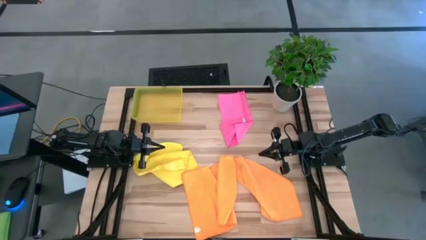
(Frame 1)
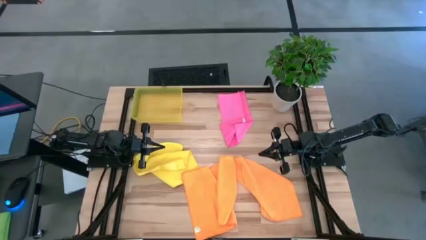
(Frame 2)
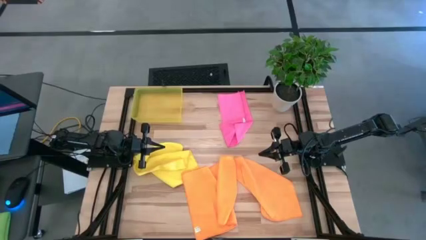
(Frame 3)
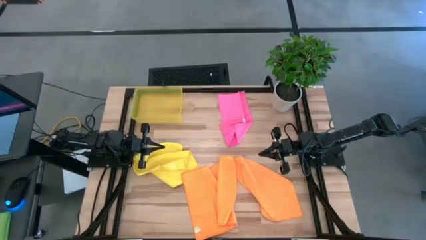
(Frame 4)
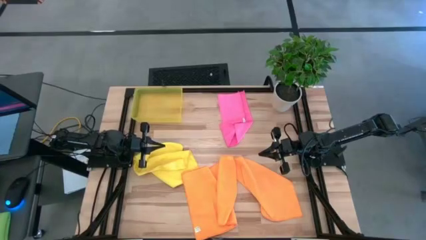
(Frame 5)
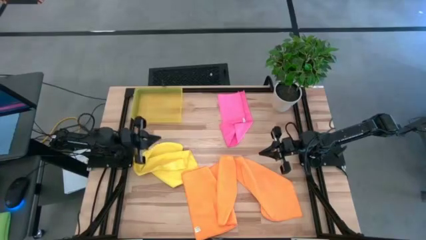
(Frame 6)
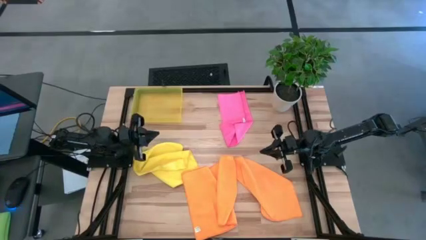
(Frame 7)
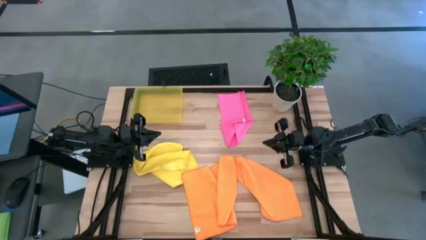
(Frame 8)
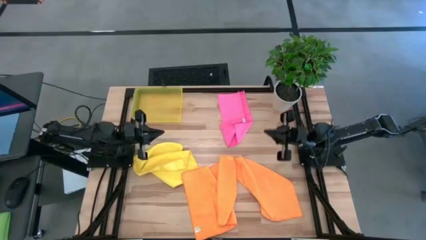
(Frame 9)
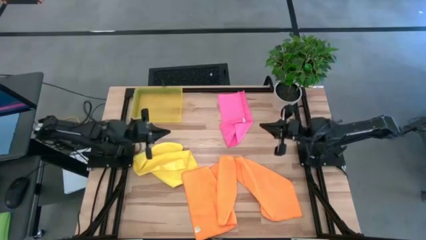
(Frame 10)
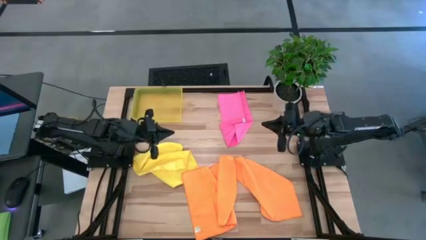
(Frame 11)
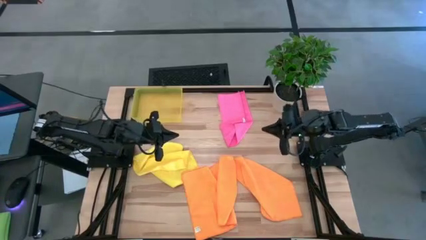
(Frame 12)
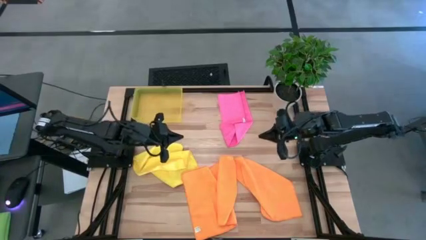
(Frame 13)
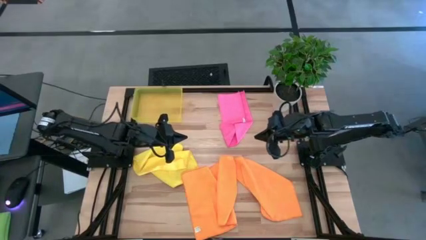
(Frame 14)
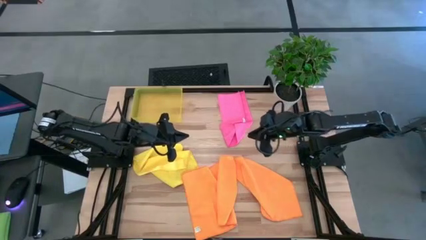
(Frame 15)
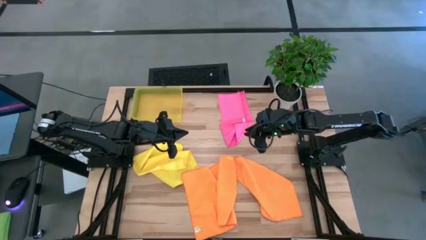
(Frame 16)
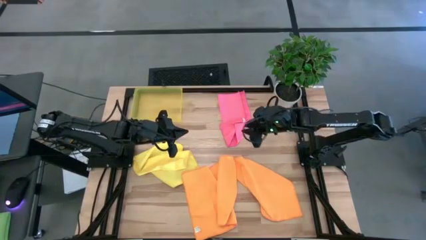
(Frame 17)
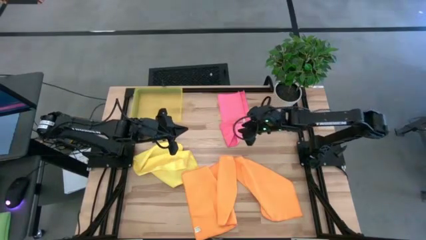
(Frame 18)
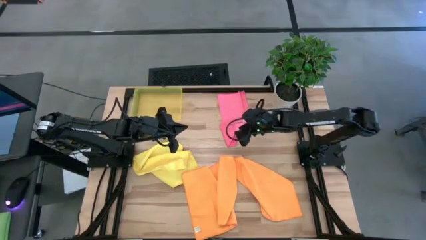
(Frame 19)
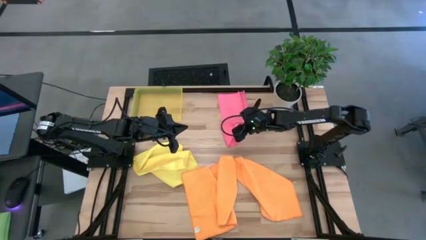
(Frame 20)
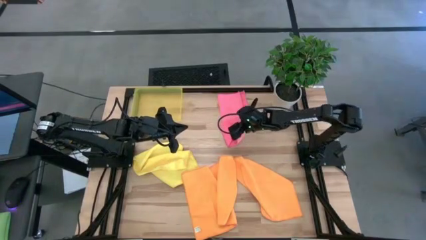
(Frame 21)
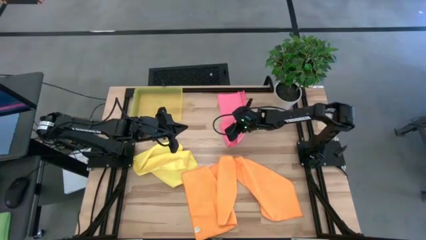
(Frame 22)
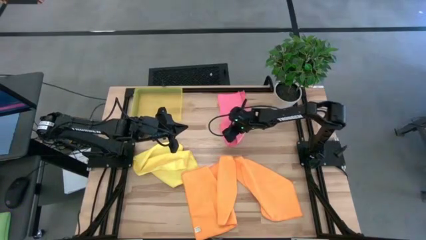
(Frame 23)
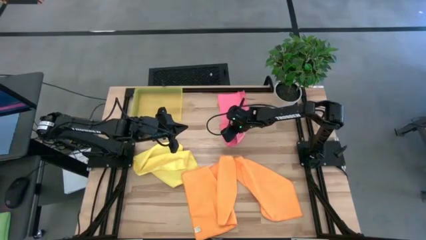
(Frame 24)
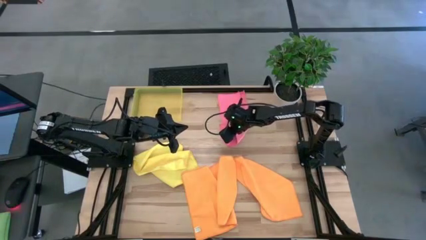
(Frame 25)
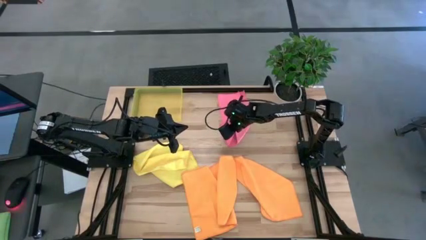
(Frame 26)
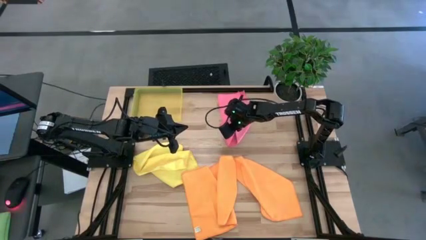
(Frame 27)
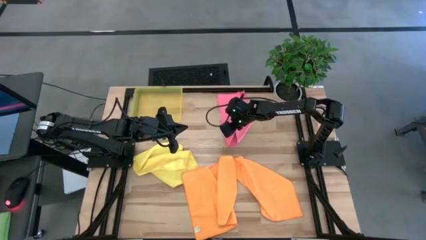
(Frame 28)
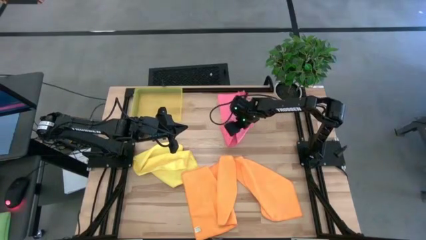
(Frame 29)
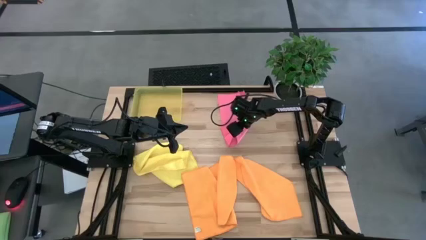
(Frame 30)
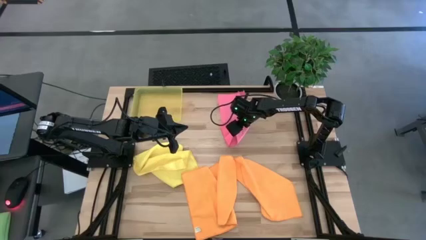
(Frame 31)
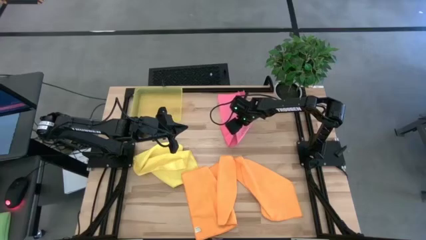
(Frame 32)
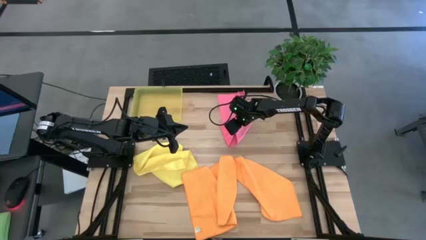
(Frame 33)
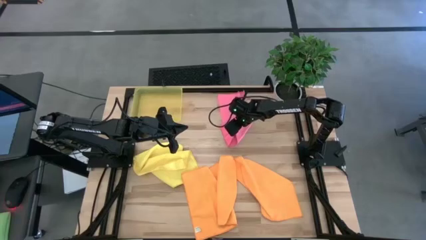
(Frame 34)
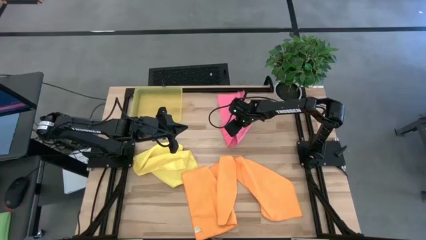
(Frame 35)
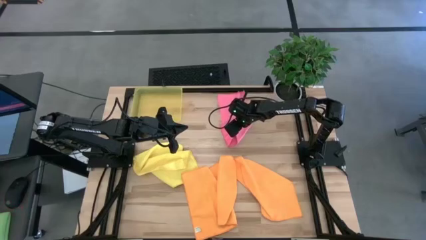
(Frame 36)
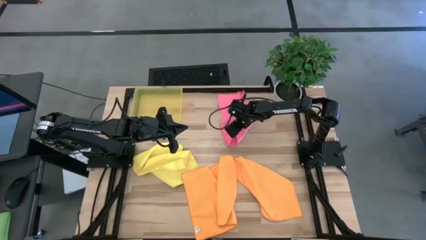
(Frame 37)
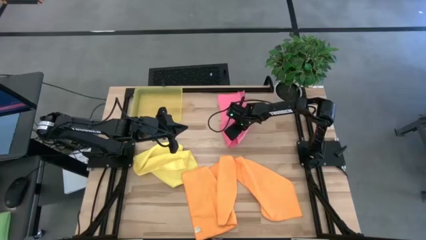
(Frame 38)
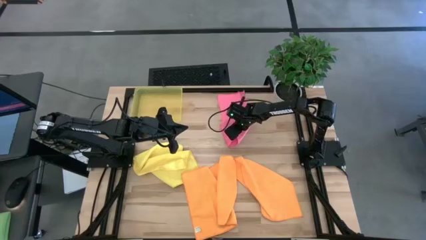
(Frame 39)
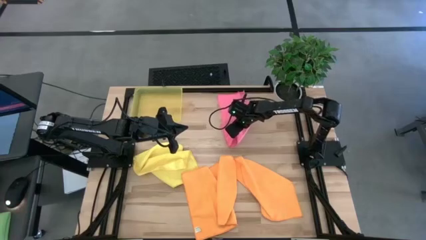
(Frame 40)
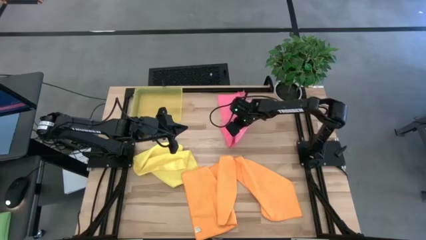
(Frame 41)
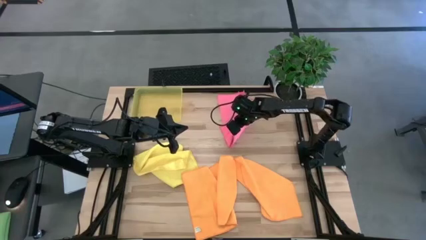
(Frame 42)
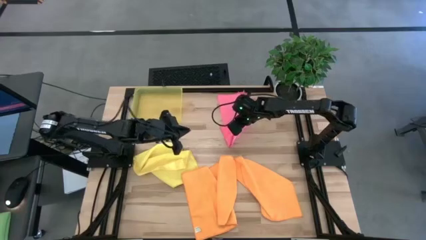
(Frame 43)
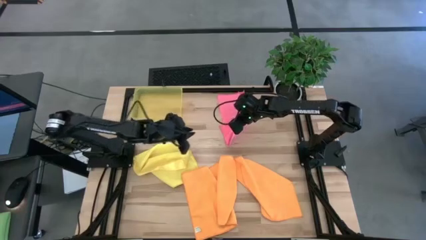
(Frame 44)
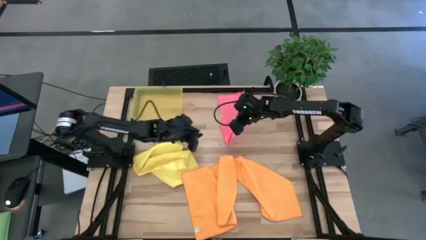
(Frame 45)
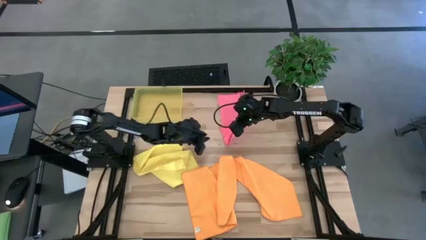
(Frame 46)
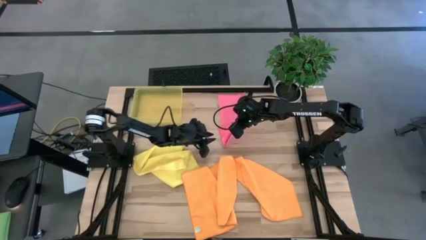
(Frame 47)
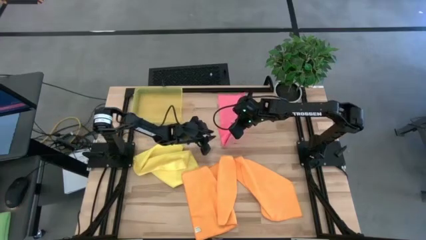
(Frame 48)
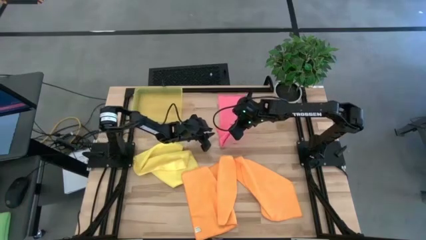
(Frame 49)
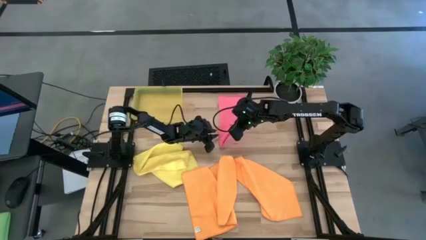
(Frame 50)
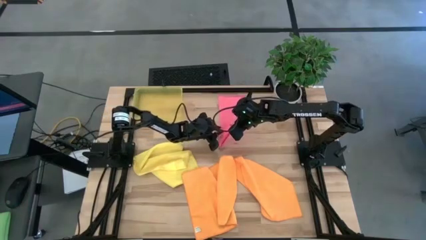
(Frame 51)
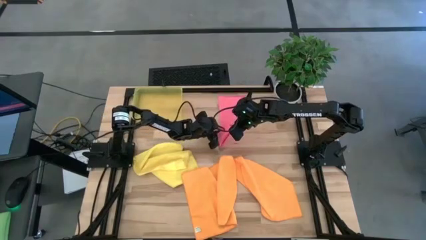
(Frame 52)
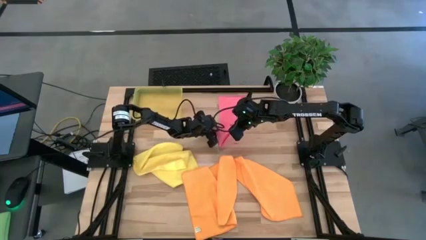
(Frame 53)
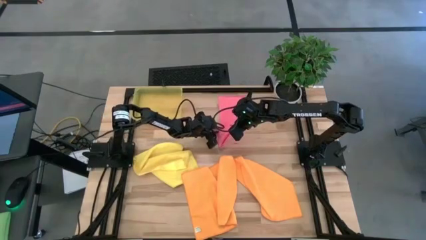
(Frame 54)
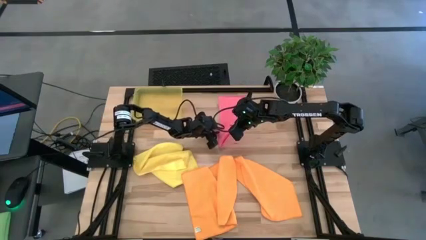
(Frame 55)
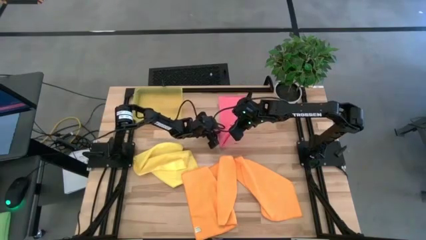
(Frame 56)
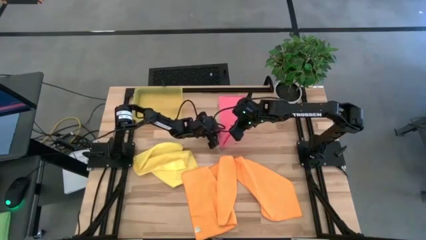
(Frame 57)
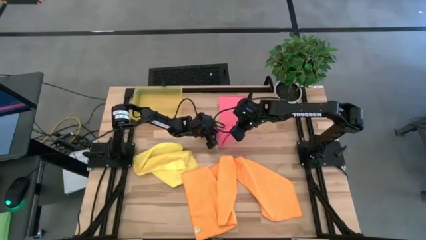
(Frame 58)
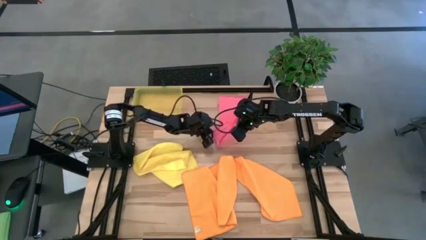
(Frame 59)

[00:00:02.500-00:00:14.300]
Task: Fold microfiber towels
Fold the pink microfiber cloth

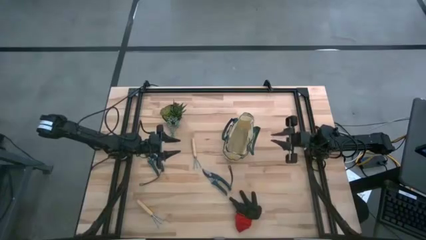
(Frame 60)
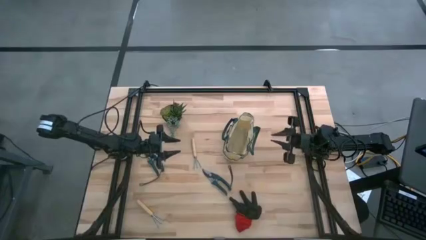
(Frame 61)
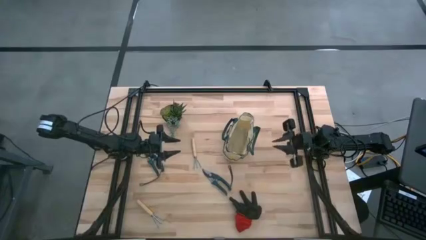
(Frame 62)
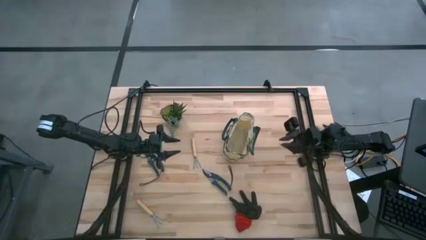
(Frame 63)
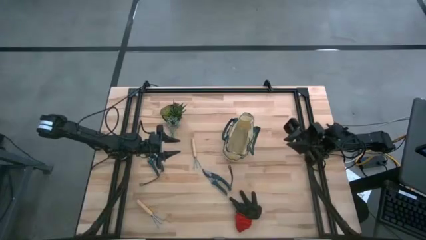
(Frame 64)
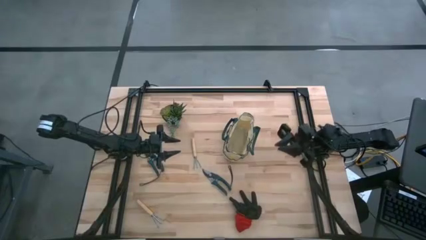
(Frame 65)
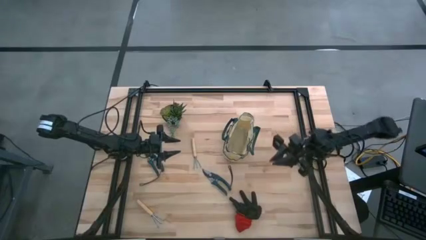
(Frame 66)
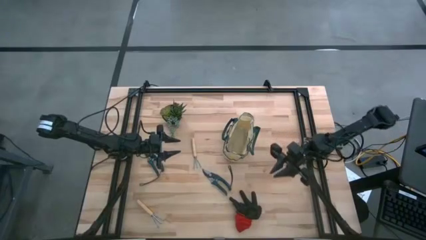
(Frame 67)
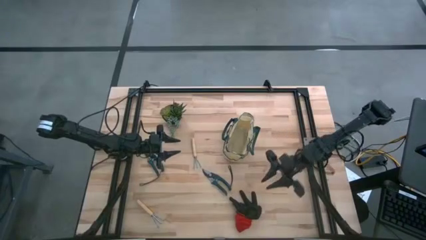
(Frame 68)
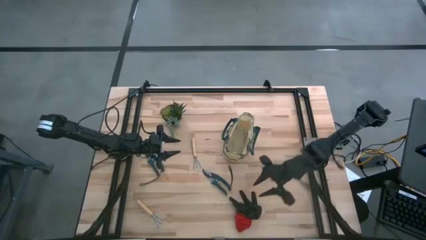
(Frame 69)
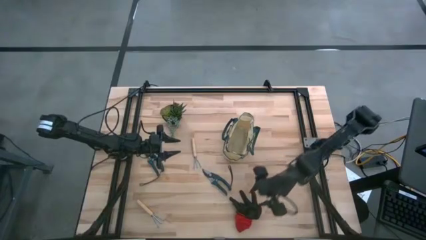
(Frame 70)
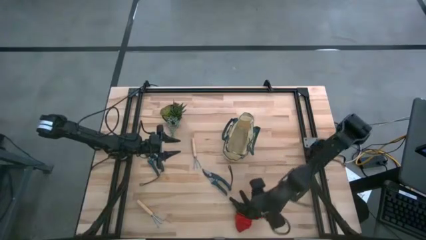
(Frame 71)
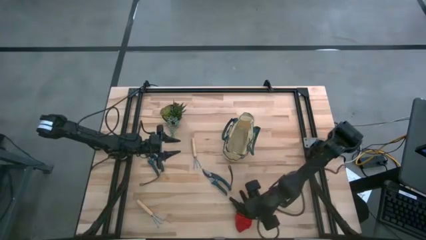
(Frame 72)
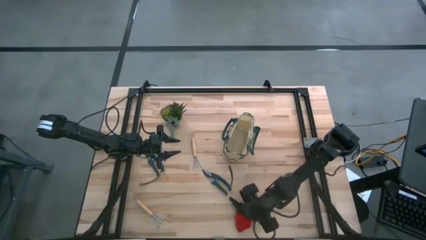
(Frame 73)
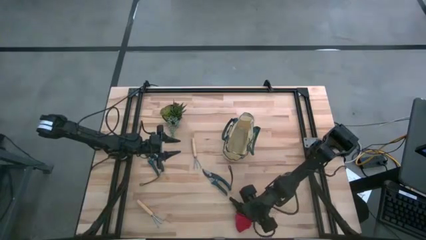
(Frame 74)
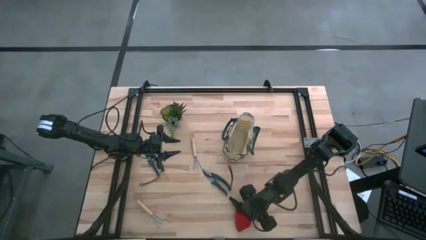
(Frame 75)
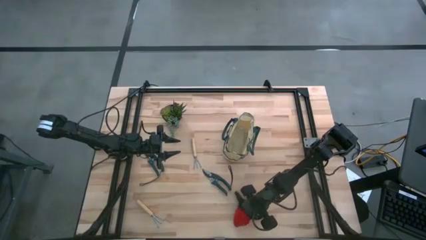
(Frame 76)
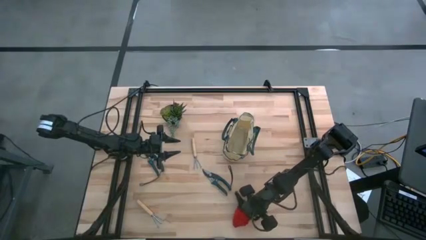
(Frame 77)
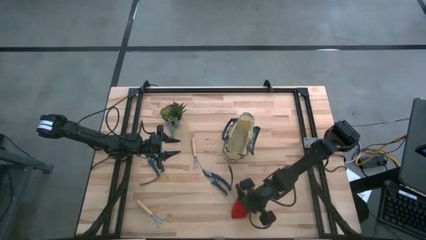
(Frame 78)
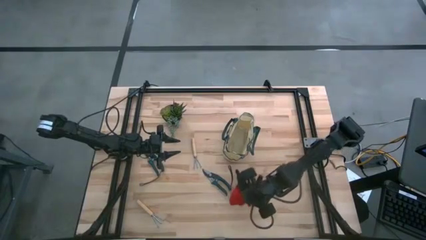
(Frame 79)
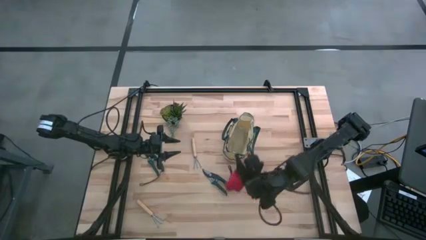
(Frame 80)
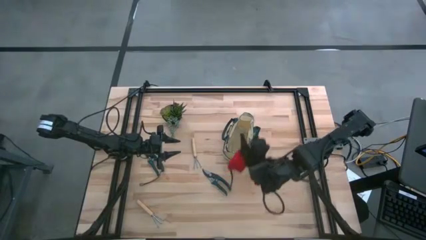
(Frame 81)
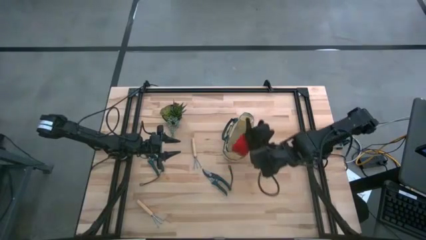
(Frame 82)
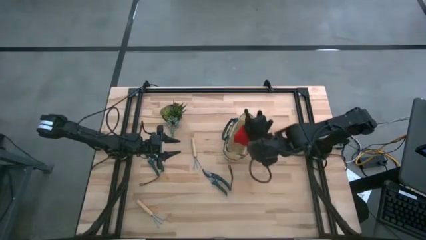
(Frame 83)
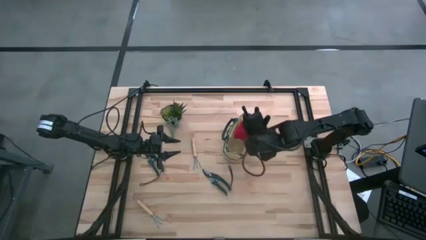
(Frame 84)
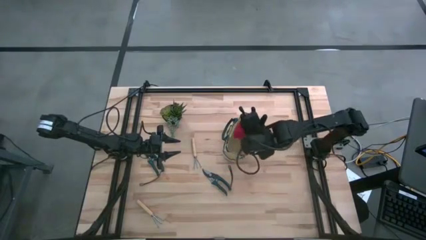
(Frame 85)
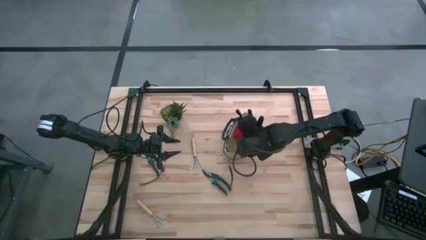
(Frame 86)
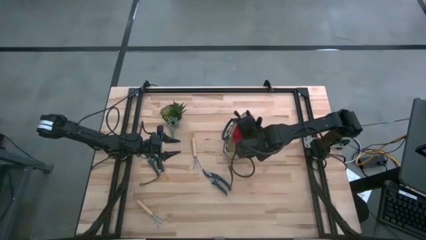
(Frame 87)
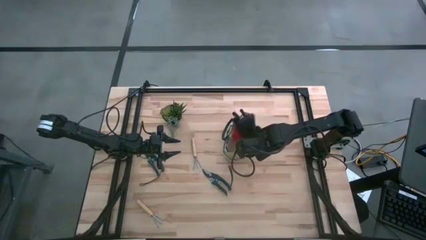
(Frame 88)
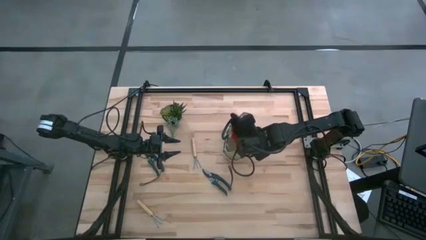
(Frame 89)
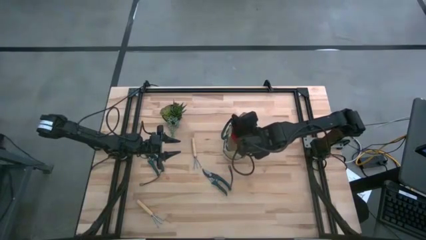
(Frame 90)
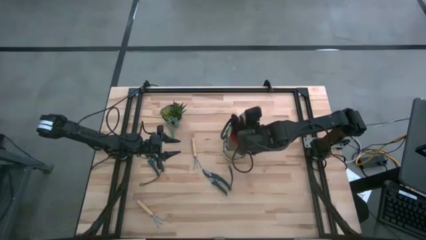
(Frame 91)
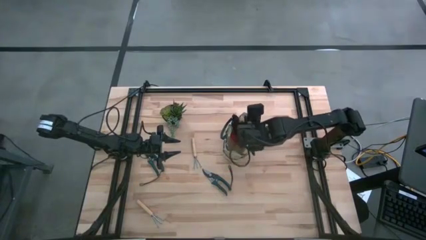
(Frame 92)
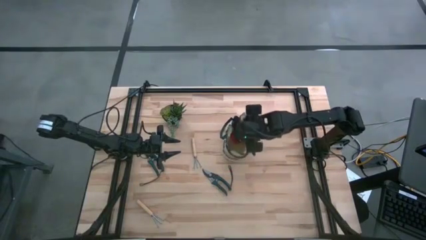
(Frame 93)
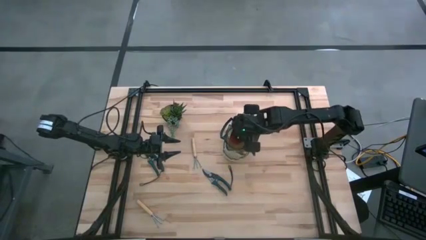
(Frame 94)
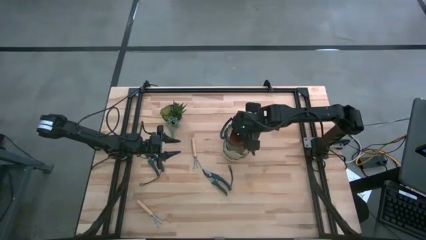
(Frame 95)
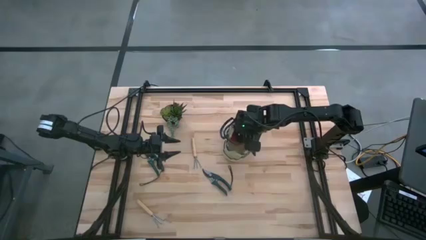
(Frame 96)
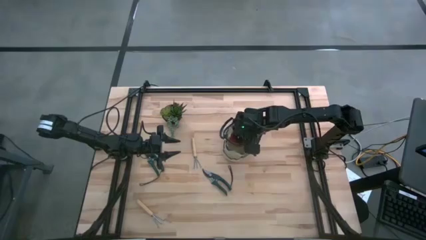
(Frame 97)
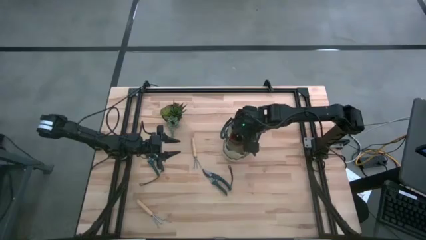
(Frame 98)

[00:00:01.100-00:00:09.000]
Task: Pick & Place Garden tools in Gardening bag
Put the red gloves into the white gardening bag
